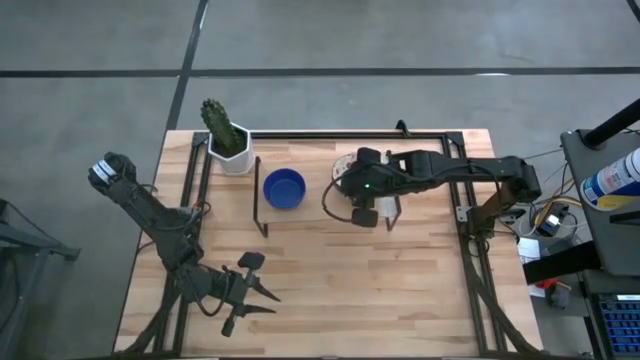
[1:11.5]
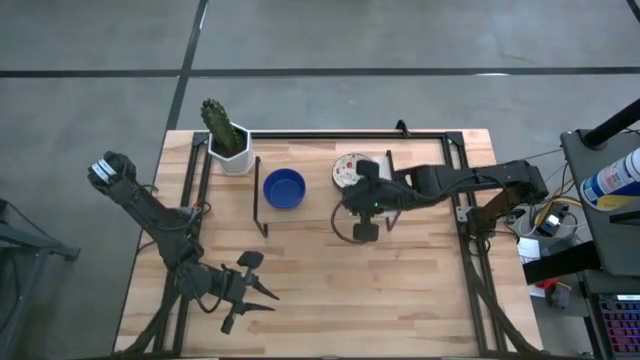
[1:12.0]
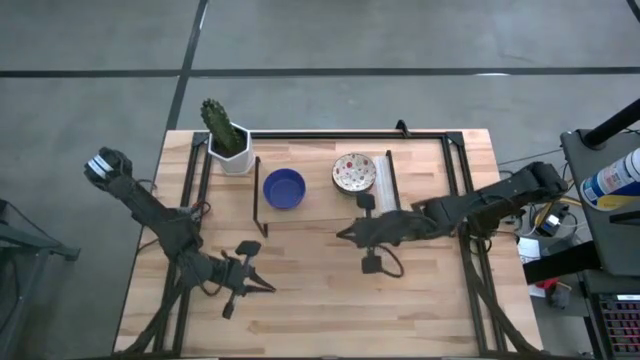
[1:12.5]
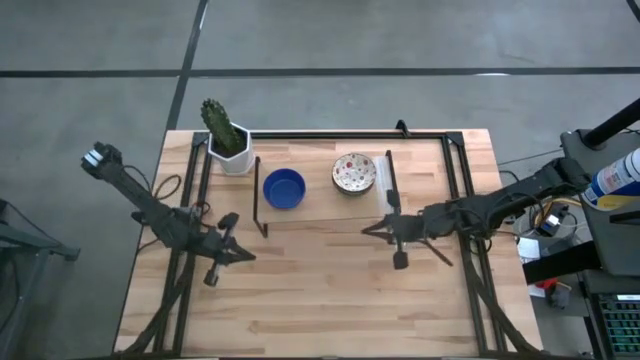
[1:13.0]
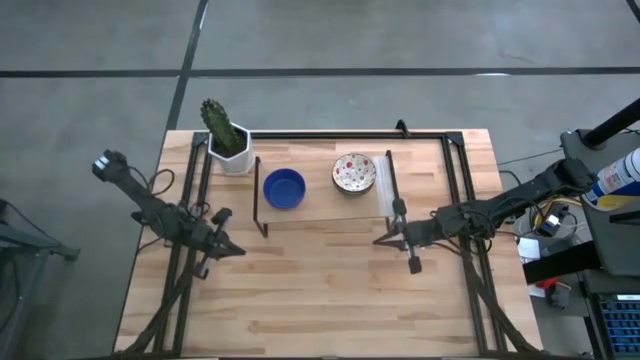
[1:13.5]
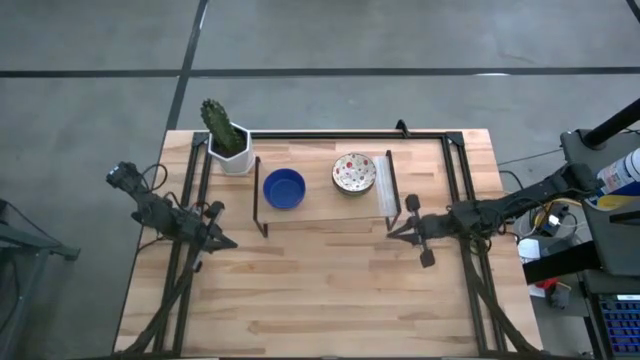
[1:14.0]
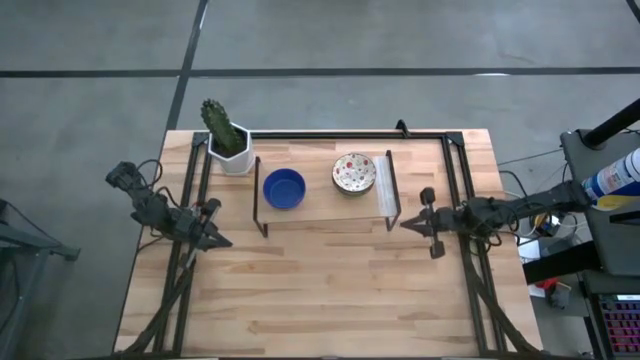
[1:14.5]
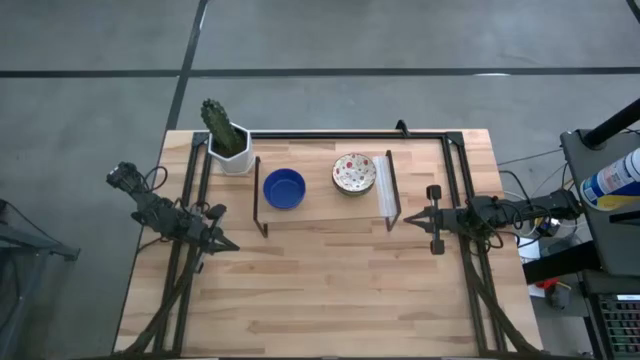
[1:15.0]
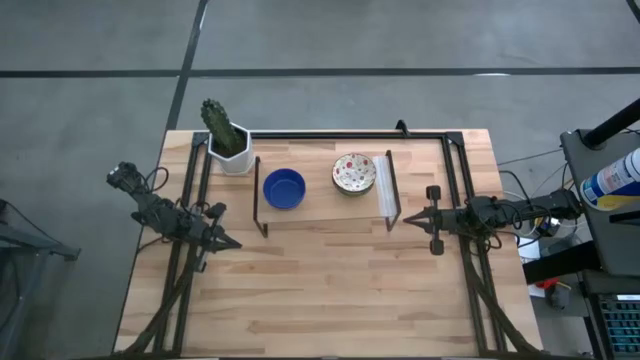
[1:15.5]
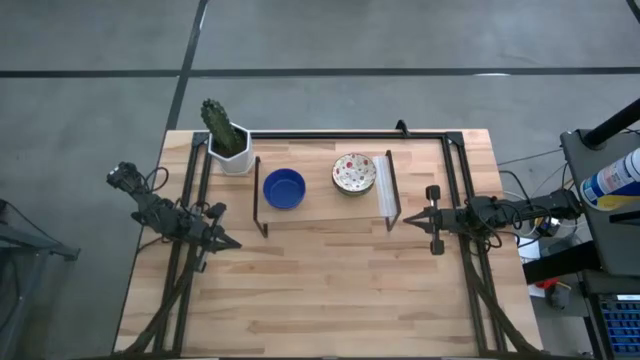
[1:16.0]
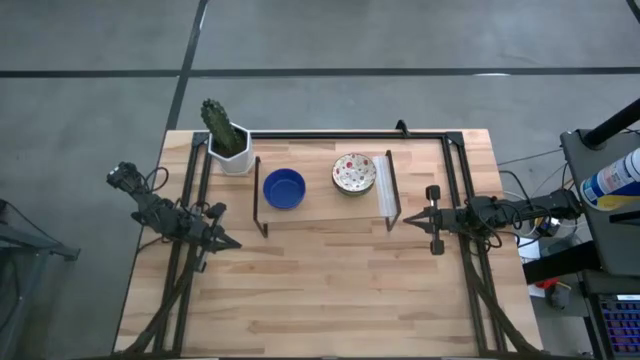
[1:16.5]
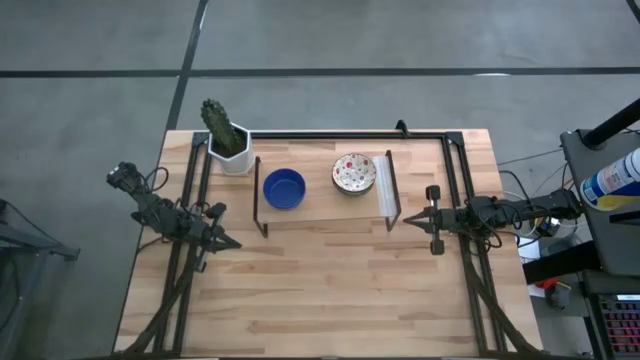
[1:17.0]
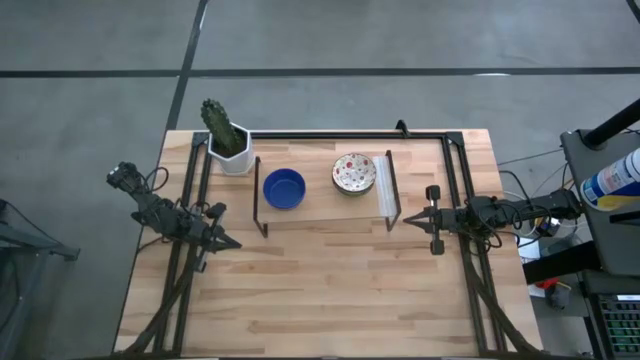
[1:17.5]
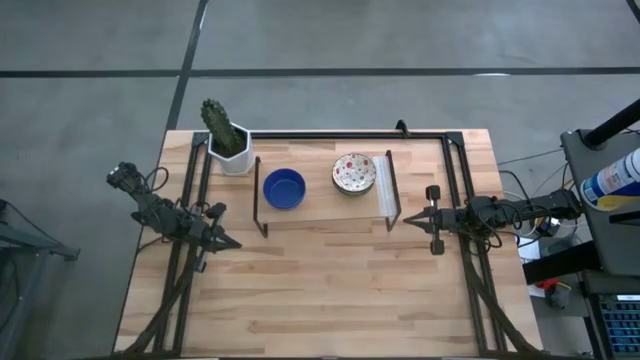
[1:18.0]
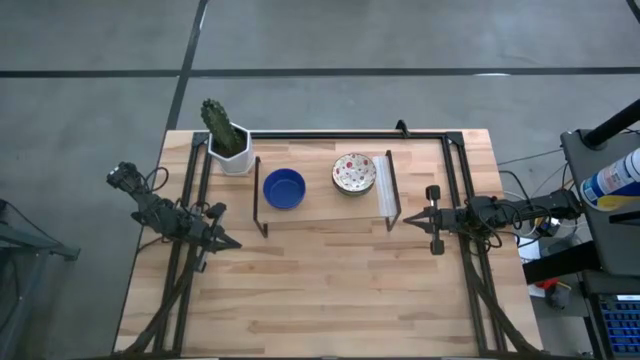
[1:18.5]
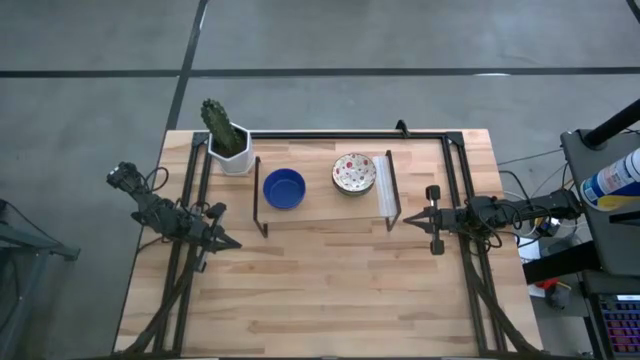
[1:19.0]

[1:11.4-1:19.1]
Task: Pick & Place Mini bowls
Return to Home Position

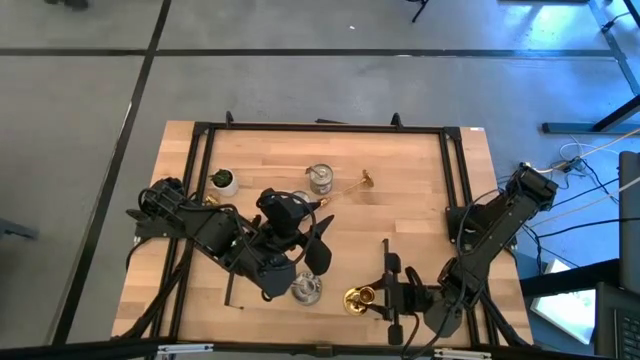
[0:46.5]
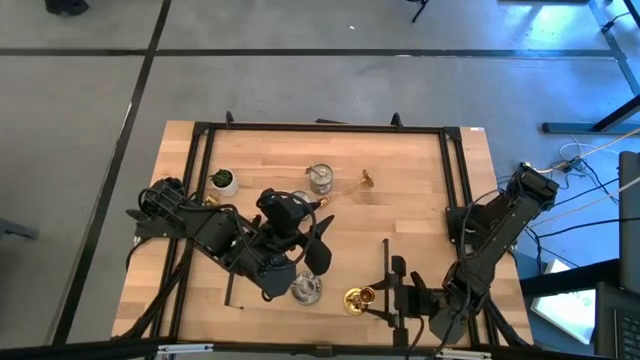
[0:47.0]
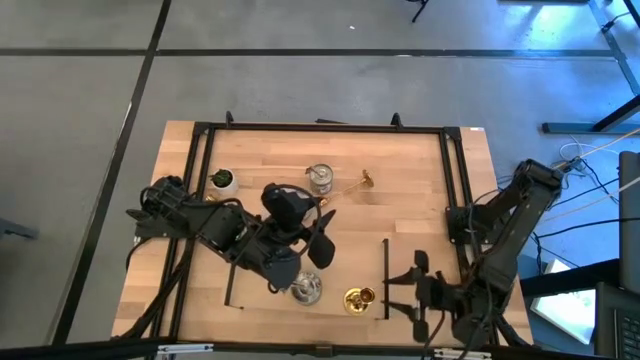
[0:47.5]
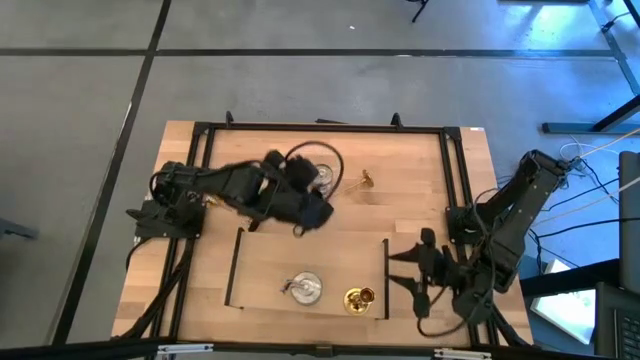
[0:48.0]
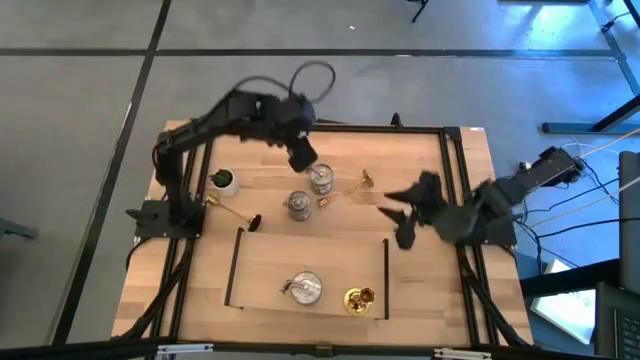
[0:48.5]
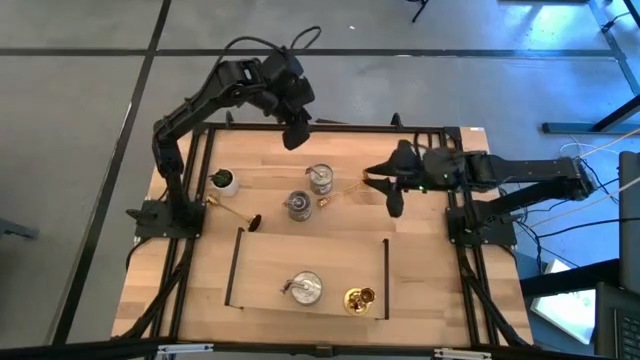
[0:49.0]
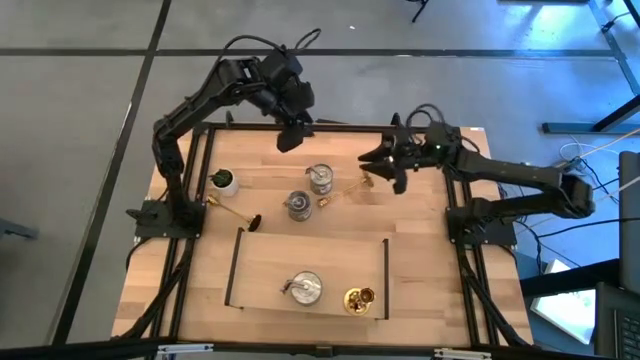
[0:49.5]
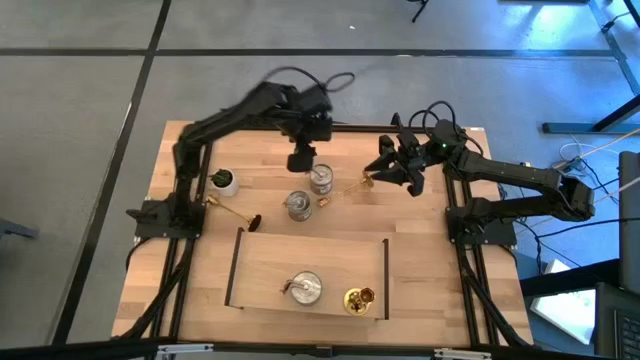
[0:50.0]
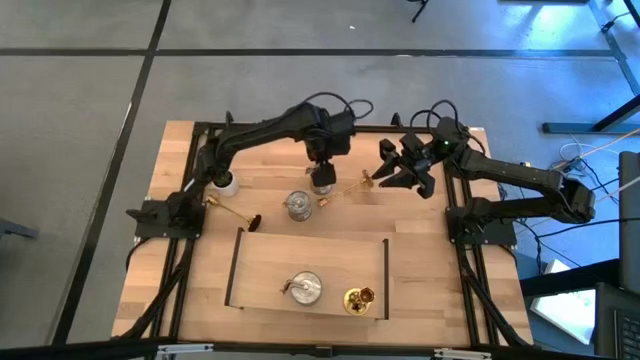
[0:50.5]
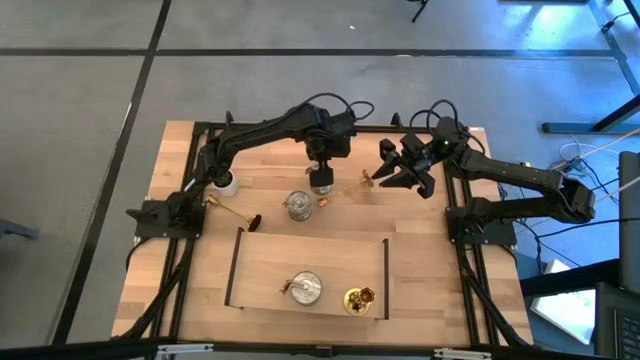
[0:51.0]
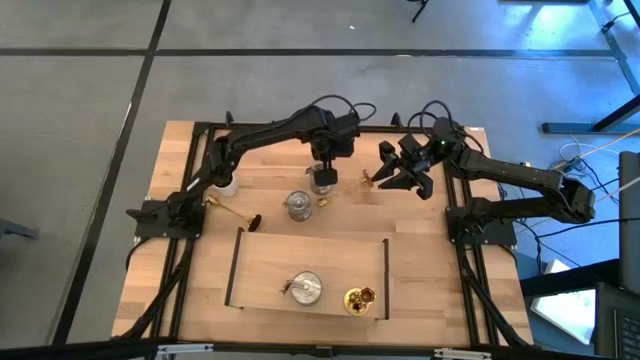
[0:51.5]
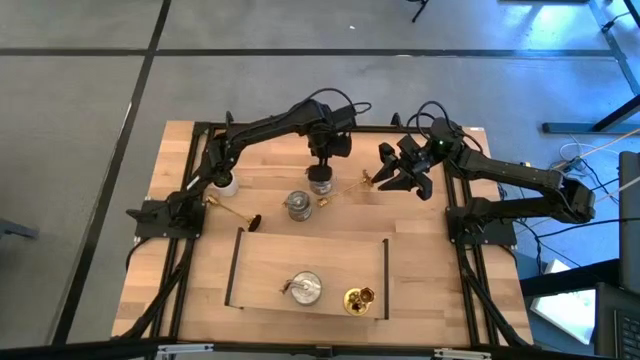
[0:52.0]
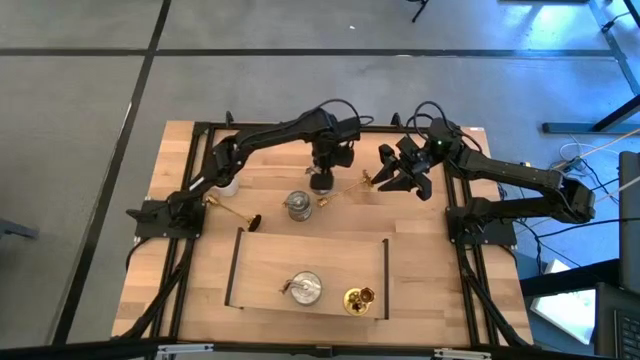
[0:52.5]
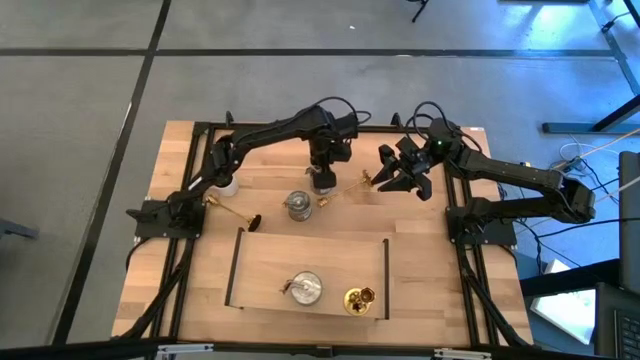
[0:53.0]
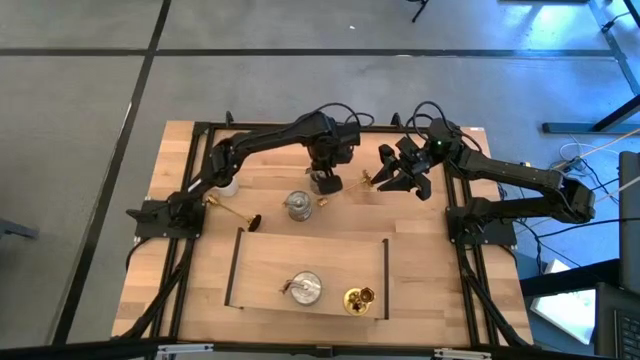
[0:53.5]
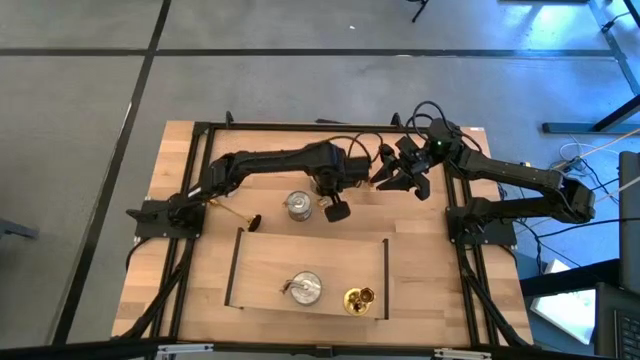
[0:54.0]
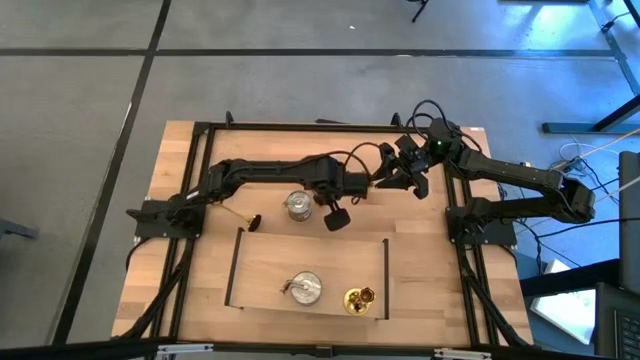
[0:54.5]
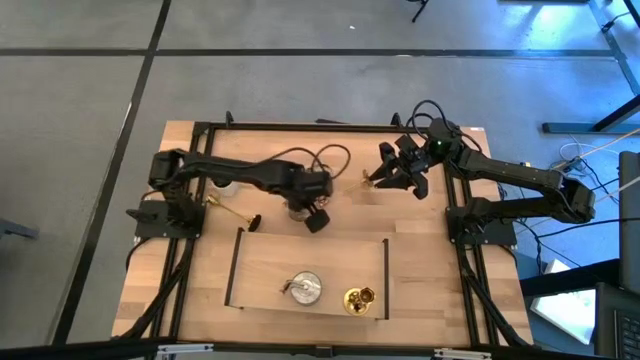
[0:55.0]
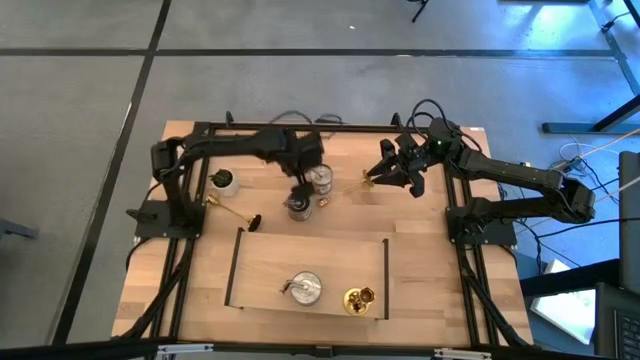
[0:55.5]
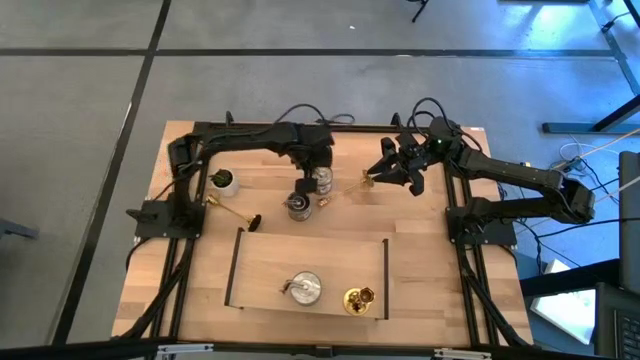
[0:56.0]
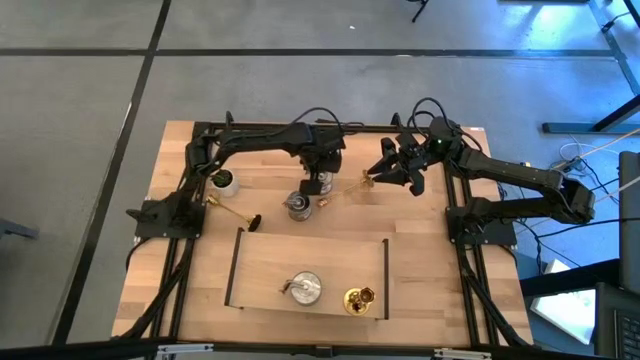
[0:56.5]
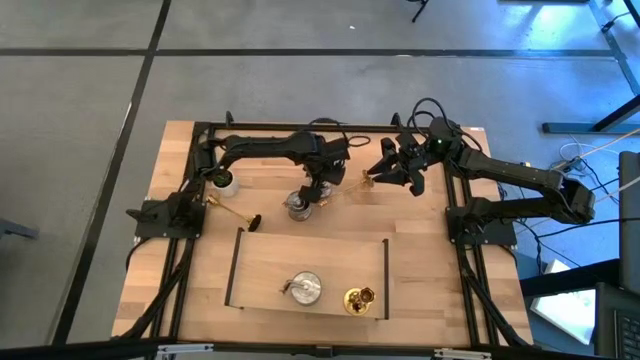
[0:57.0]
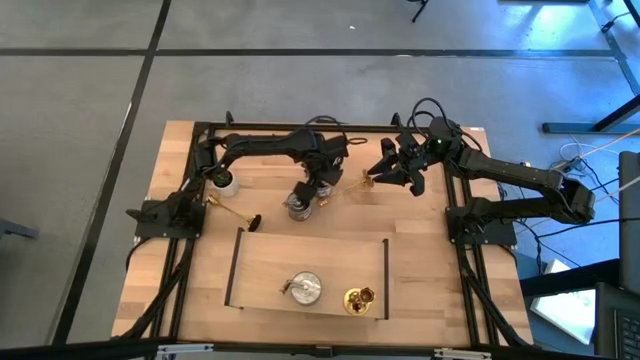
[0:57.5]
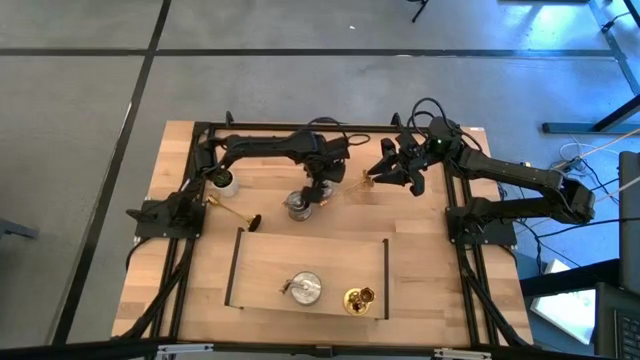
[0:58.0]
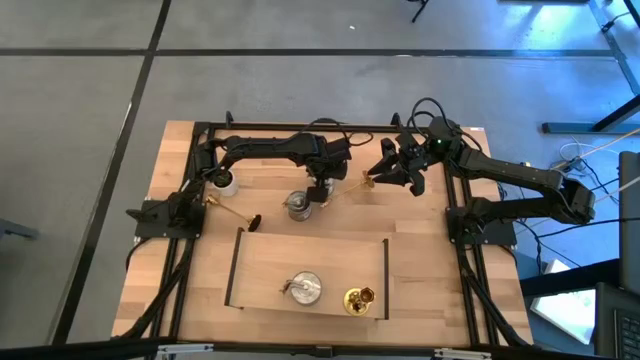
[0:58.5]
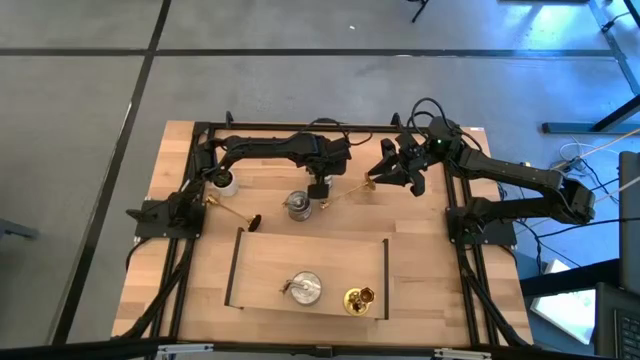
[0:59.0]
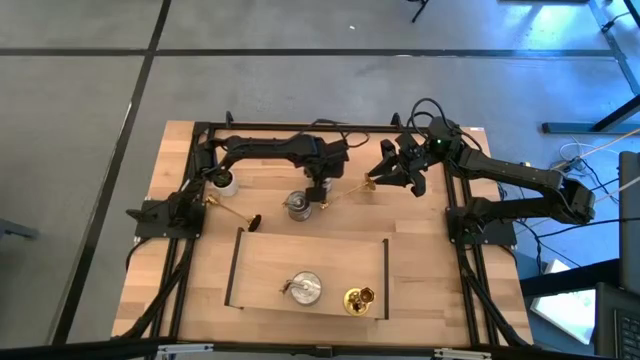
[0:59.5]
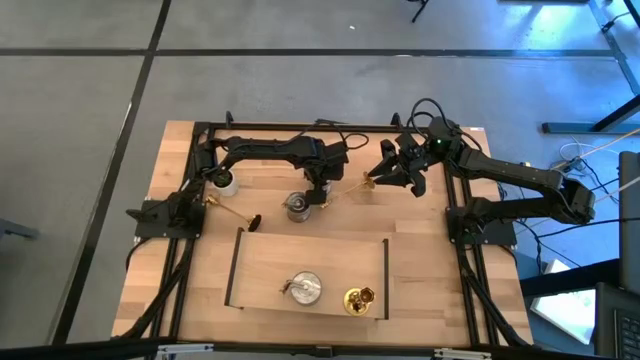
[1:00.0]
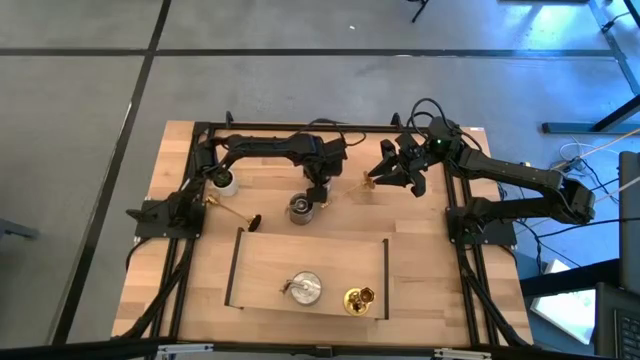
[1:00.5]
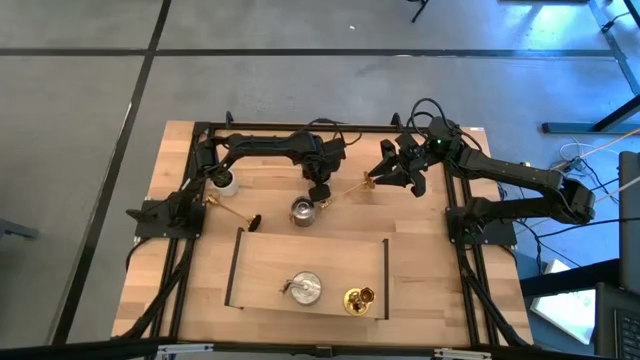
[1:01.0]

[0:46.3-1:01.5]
Task: Pick & Place candle stick holders
Put the top silver scented candle on the shelf
